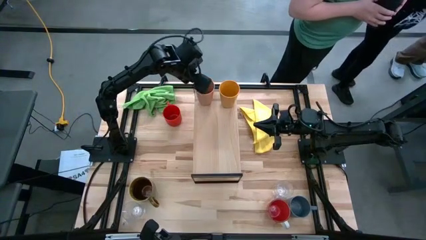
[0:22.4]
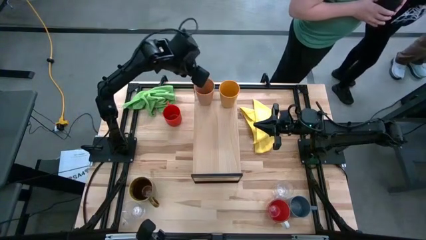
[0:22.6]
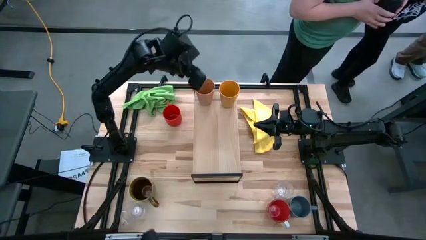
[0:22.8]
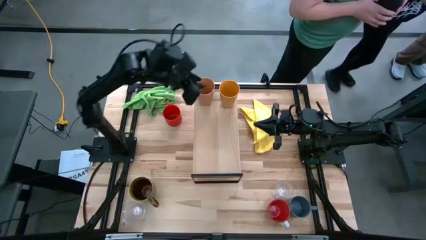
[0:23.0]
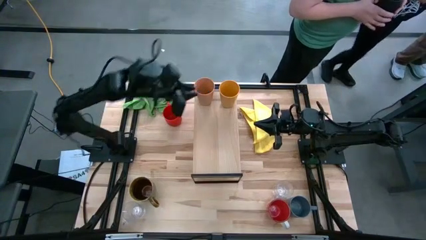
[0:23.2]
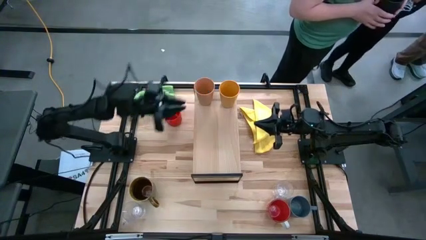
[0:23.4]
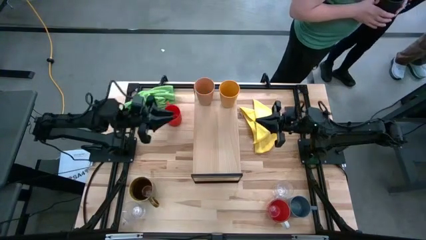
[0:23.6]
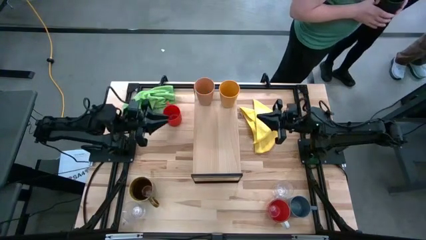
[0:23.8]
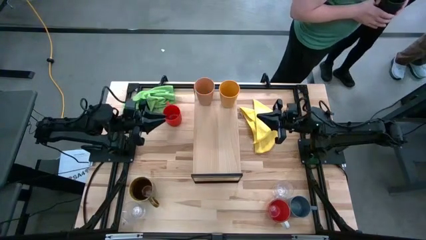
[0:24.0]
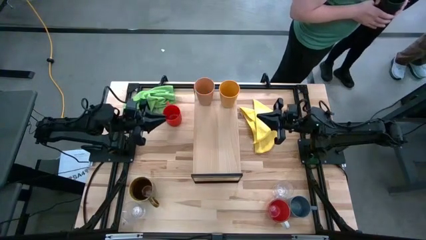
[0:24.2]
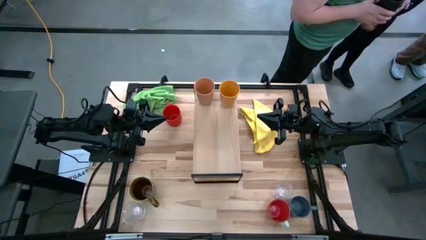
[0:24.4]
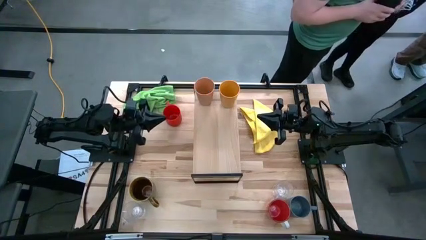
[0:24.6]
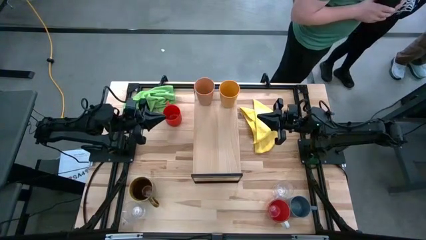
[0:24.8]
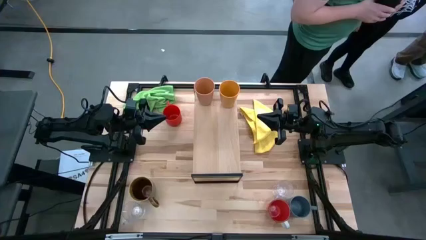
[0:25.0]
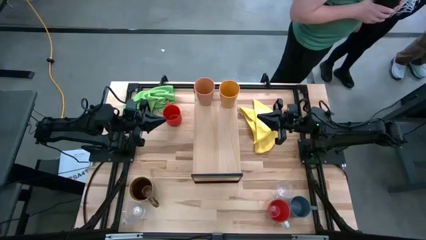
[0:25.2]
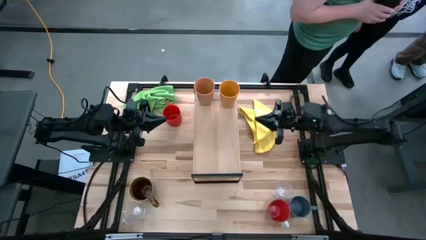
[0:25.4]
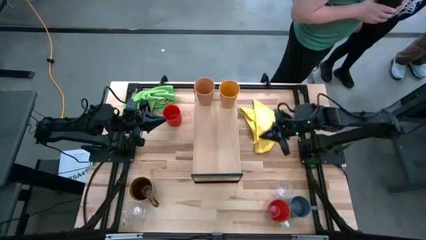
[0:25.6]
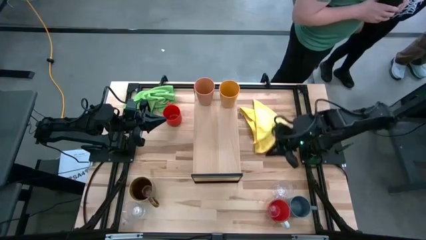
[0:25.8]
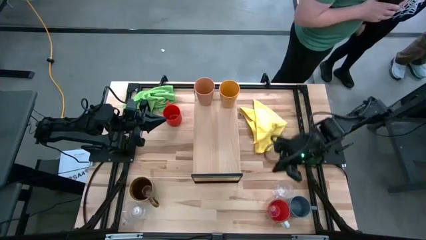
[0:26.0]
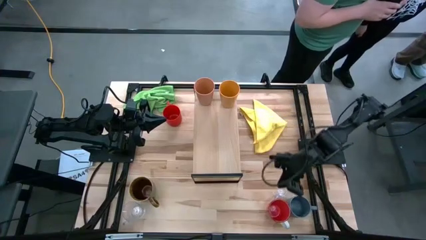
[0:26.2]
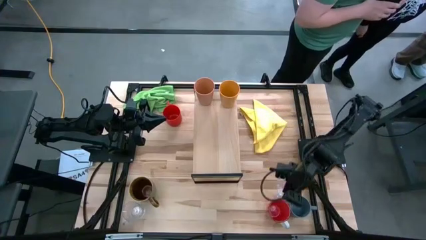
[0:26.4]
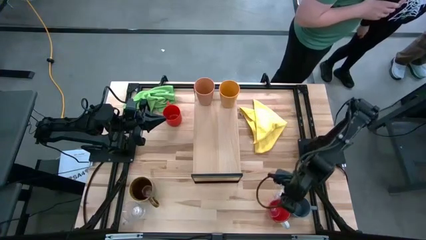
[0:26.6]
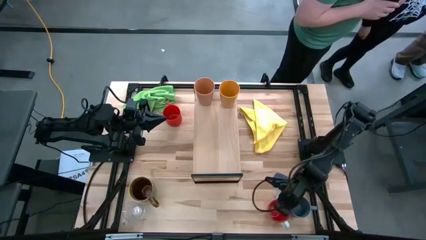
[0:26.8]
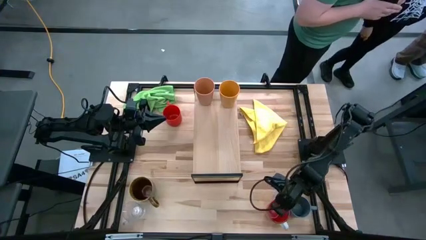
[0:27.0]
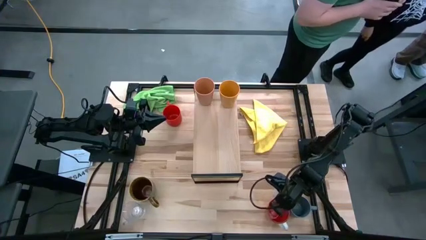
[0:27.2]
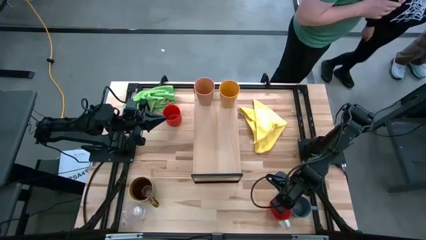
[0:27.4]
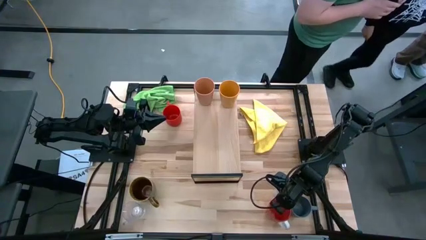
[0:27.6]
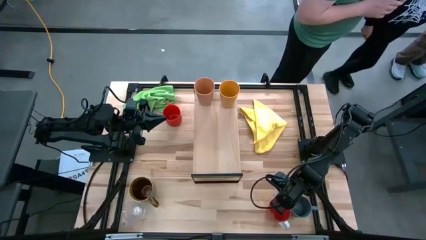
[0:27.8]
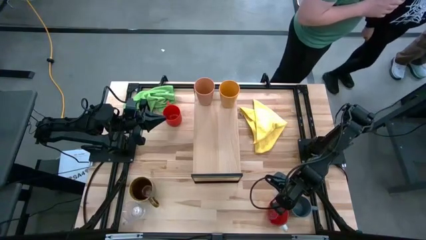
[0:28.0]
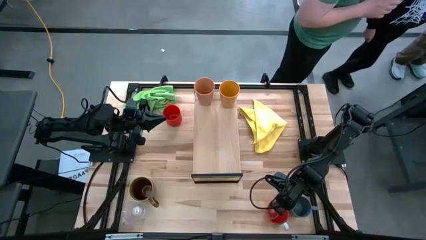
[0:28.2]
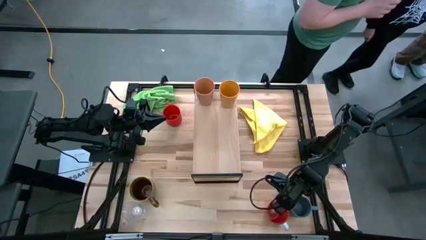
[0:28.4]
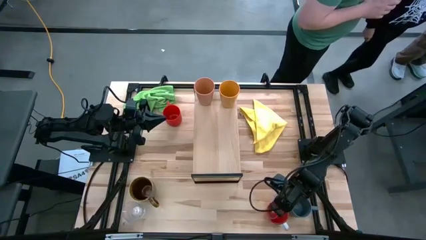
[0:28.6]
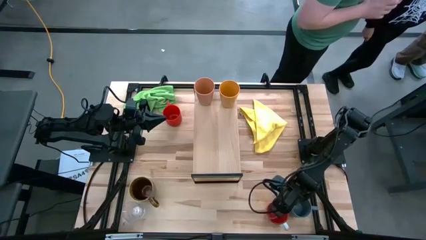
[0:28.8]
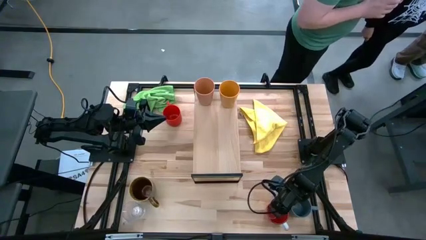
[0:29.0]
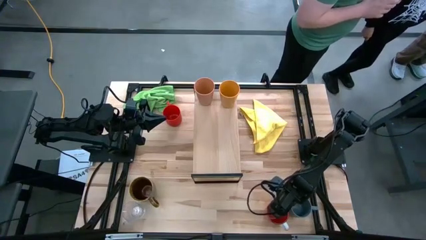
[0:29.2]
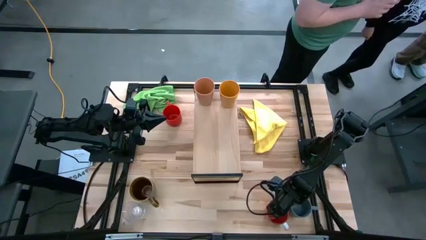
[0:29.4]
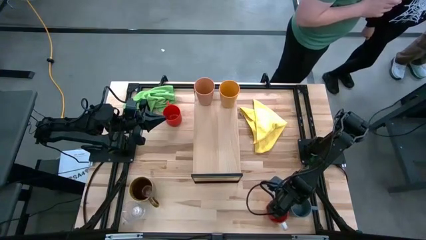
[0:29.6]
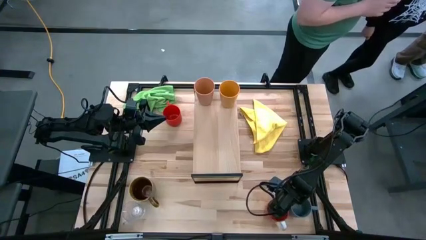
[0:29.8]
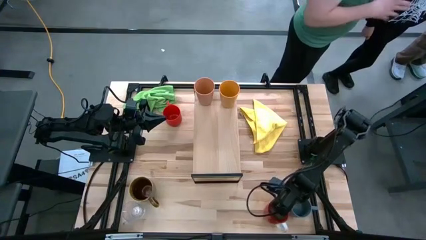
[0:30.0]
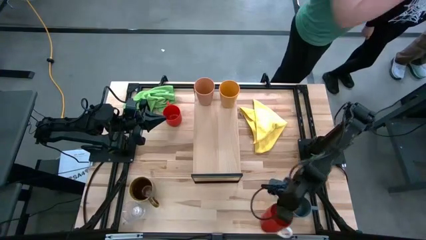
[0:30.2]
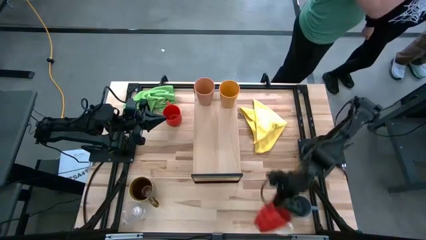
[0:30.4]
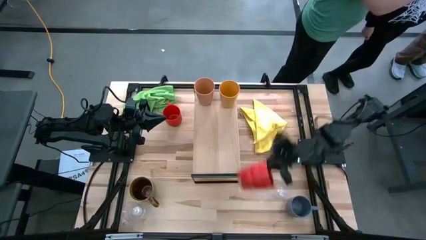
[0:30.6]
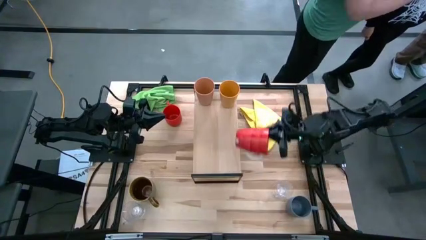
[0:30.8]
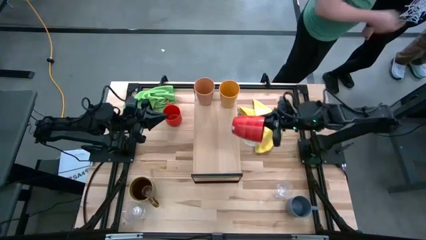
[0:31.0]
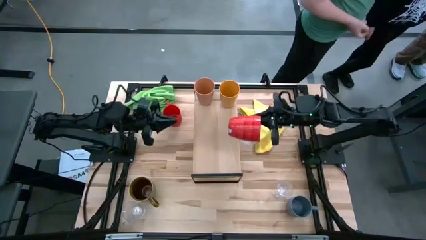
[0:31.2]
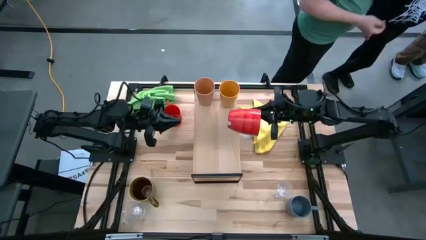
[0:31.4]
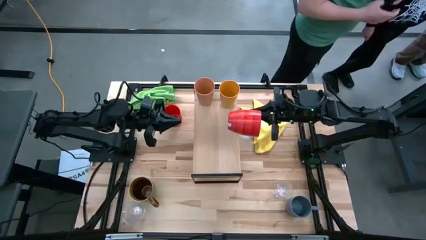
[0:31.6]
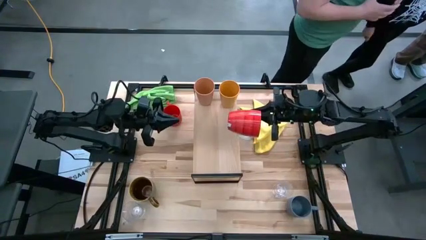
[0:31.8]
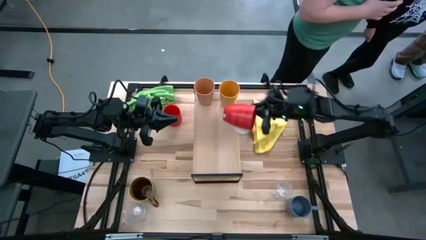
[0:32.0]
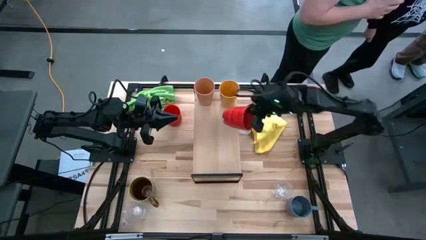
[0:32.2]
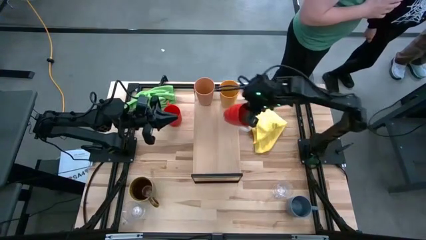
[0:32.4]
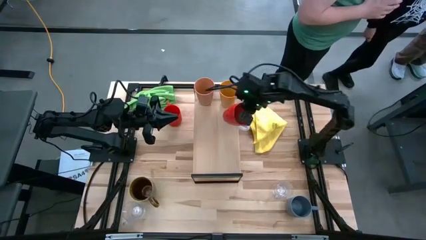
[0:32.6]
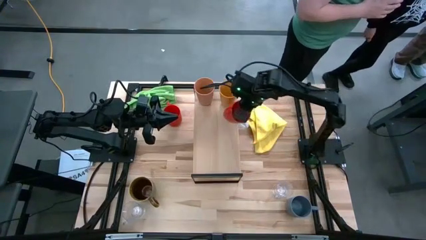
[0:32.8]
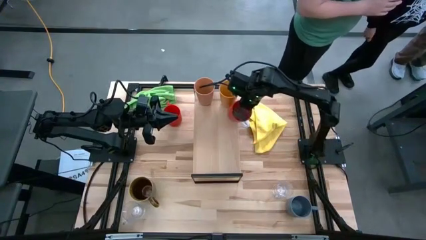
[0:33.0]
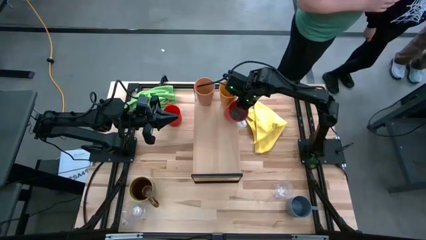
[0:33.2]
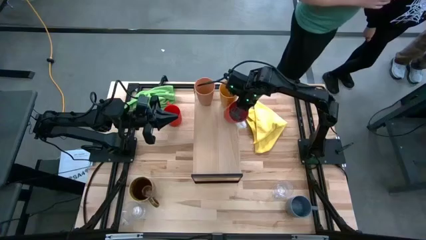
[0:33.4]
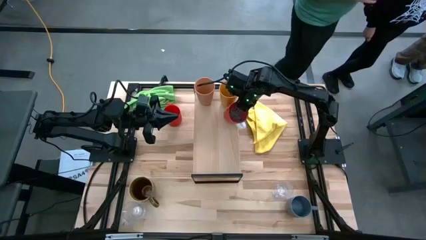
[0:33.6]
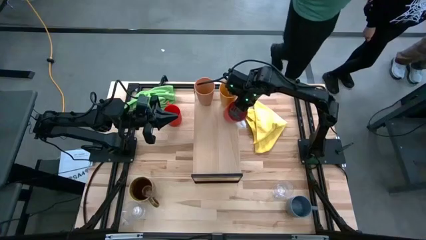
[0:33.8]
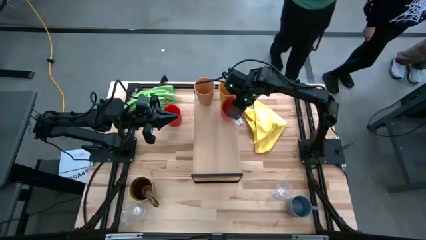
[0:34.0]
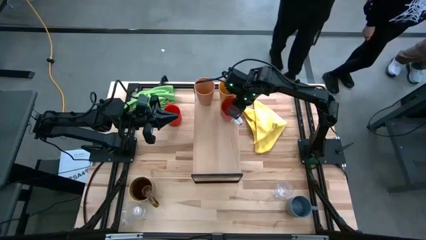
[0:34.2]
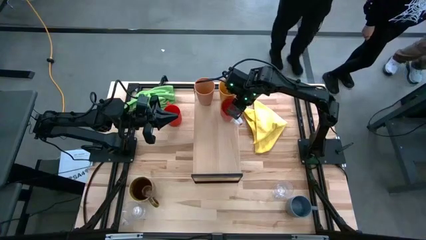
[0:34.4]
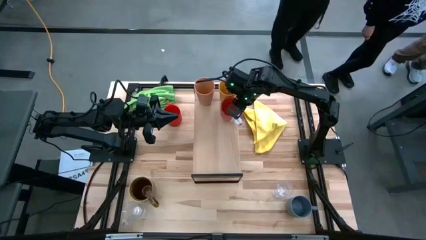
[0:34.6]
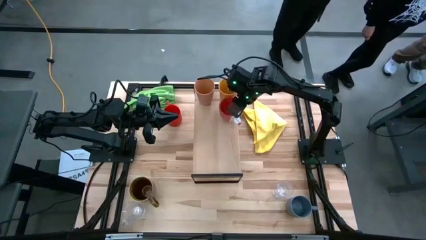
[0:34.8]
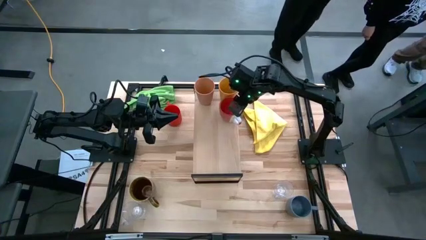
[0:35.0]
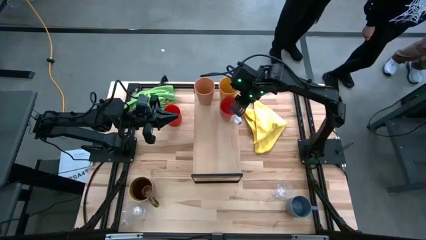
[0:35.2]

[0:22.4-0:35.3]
Task: Stack small to large cups/mugs on shelf
Put the red cup on the shelf

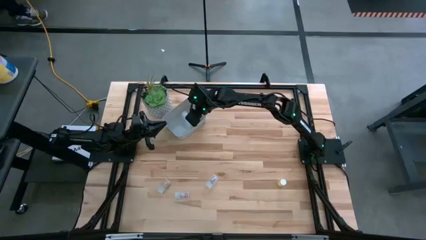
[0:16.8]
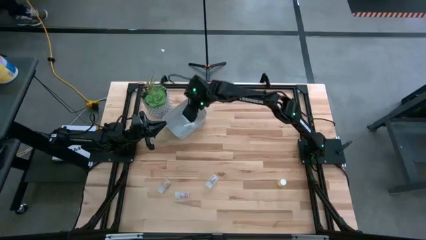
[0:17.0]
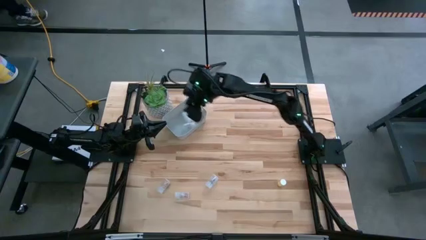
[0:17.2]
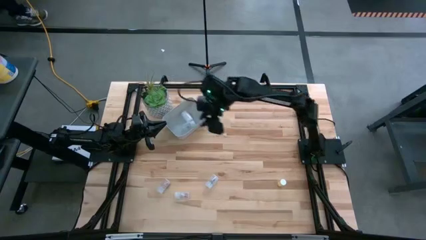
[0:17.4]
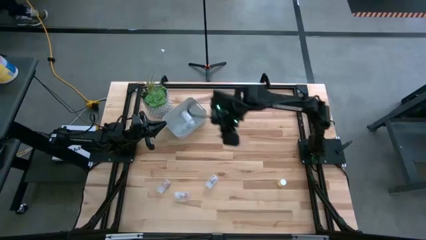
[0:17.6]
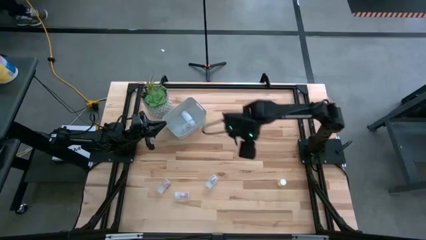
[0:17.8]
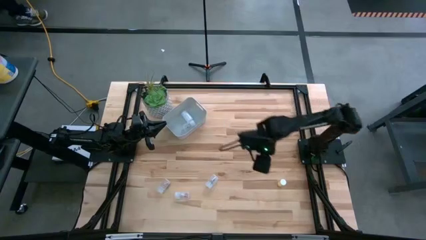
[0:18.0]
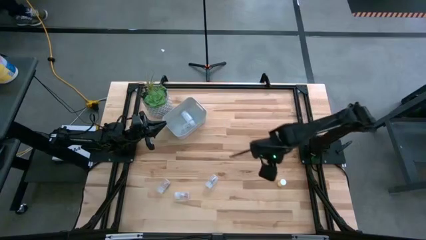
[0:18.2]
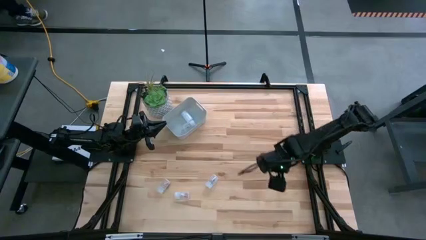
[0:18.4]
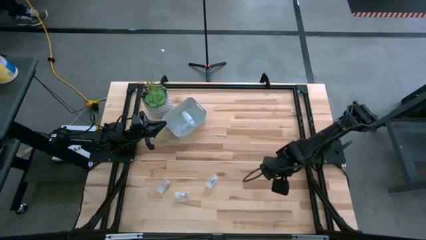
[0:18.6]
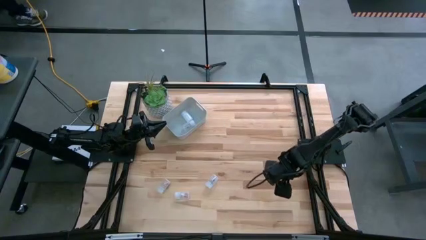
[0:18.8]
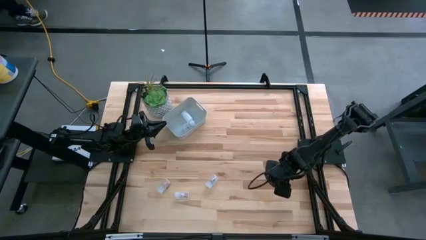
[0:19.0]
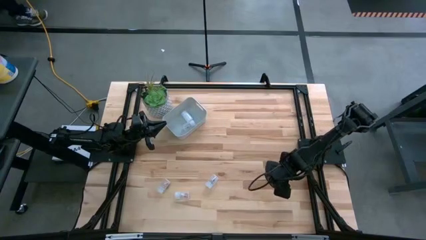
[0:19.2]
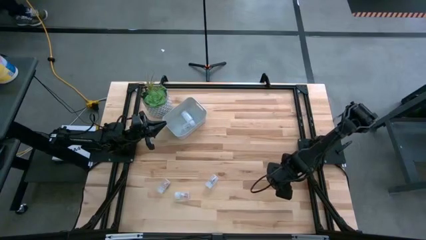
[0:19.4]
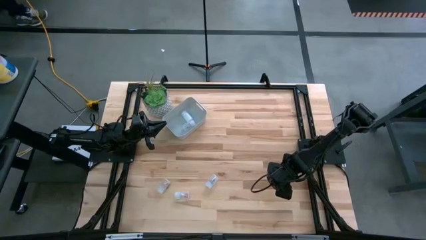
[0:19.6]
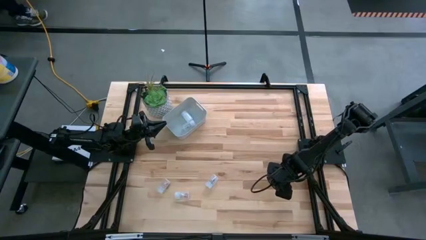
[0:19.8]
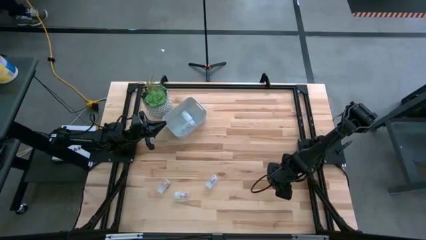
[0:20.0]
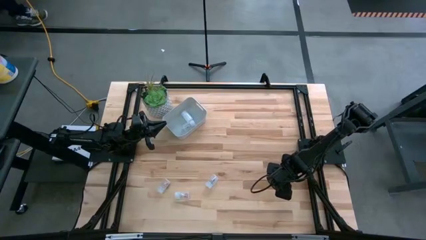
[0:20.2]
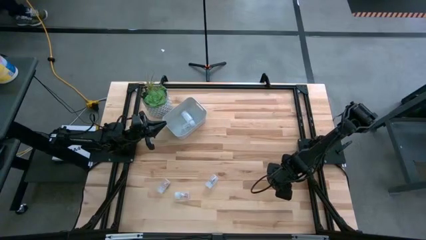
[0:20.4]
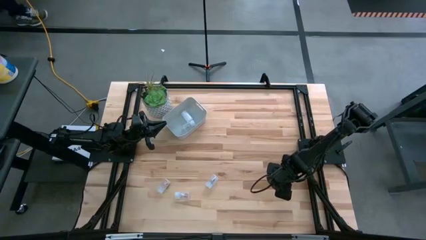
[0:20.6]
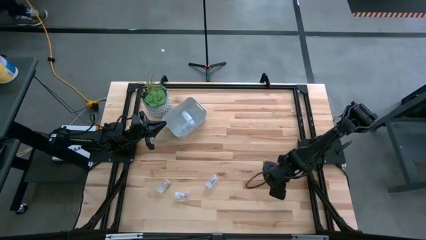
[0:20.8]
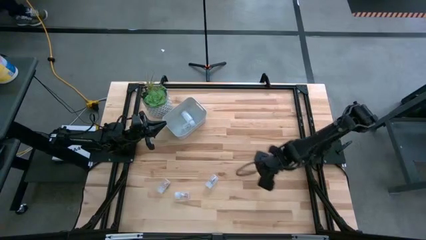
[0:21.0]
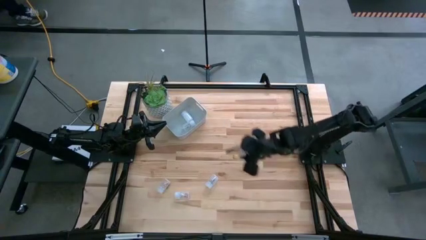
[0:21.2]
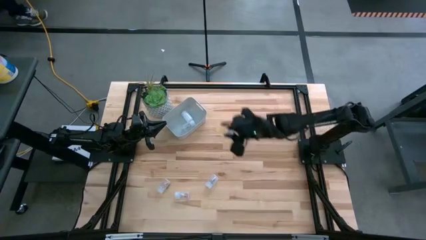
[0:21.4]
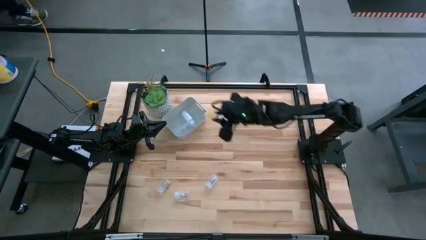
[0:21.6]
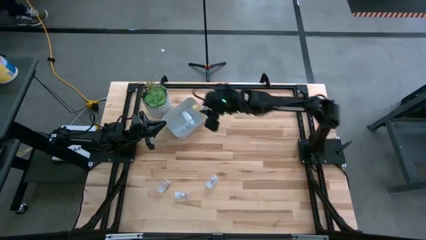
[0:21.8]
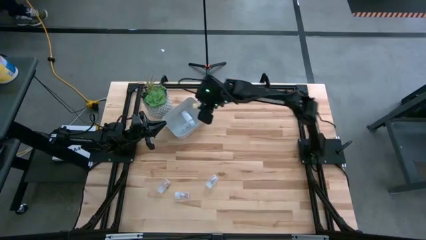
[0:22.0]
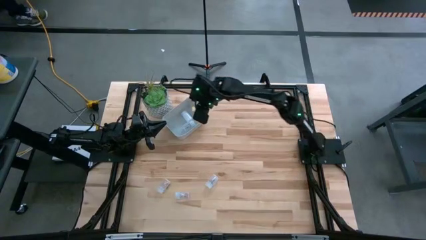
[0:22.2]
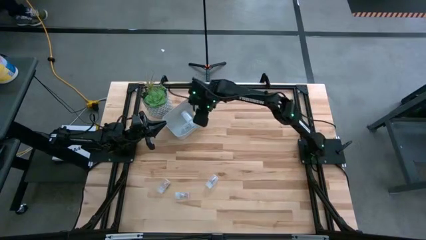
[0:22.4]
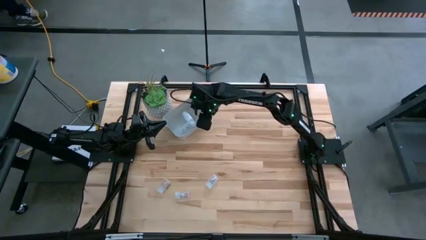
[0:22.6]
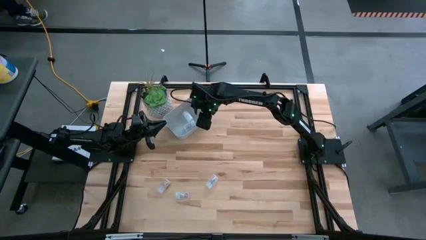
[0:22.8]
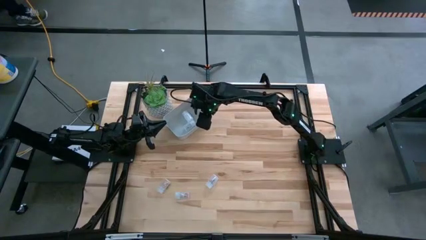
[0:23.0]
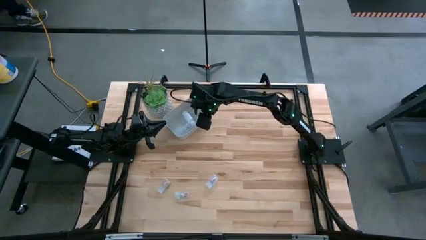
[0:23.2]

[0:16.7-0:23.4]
Task: Pick and place pill bottles into a basket
Put the yellow pill bottle into the bin
